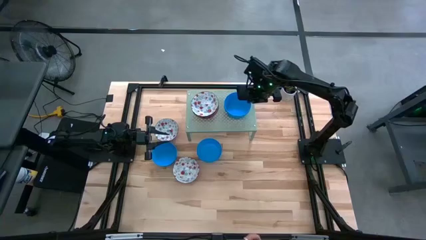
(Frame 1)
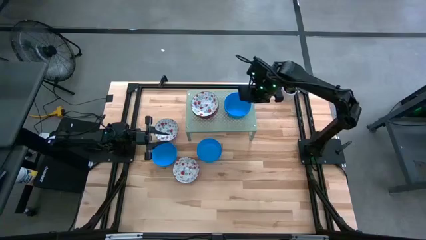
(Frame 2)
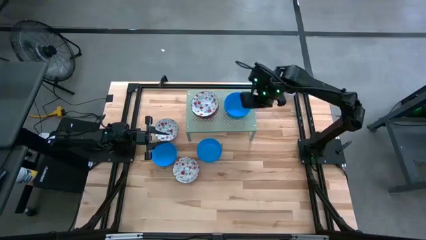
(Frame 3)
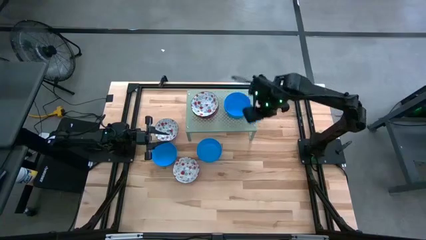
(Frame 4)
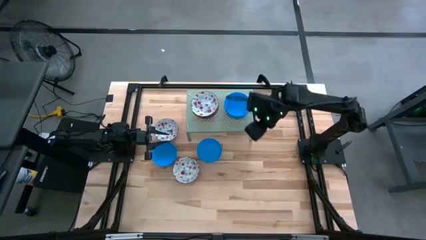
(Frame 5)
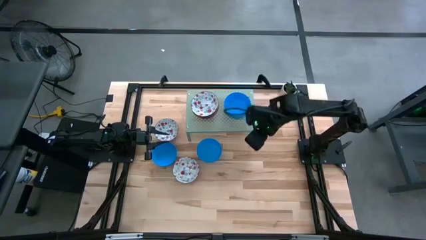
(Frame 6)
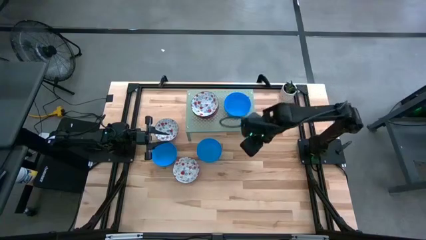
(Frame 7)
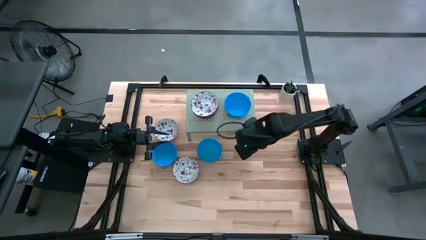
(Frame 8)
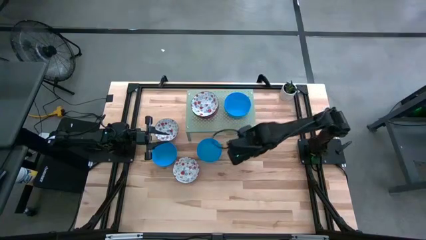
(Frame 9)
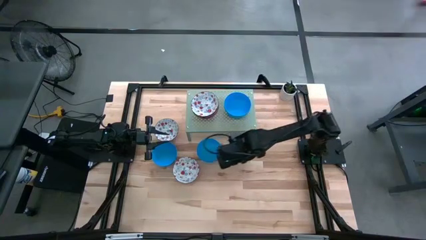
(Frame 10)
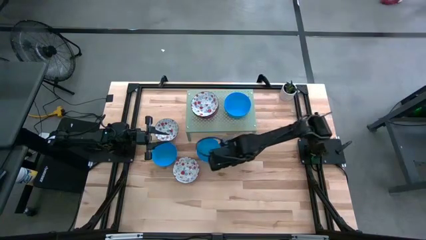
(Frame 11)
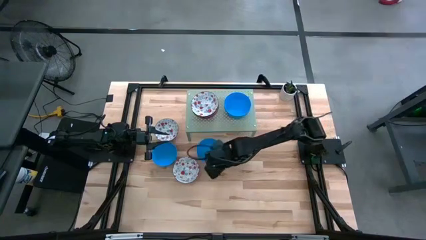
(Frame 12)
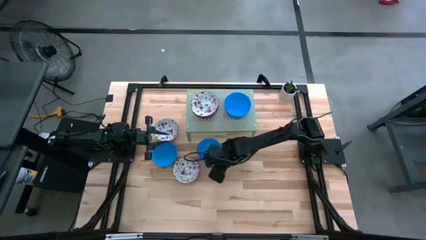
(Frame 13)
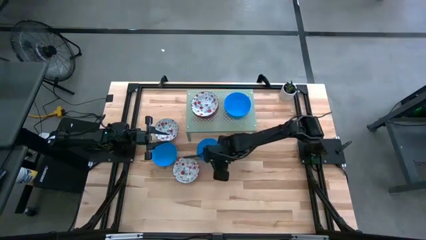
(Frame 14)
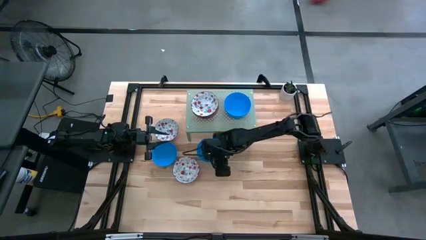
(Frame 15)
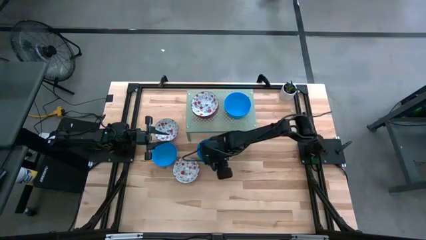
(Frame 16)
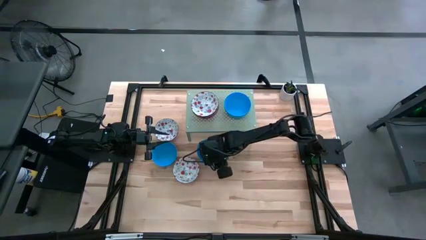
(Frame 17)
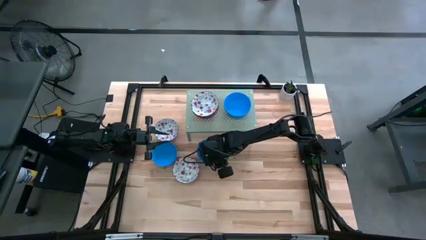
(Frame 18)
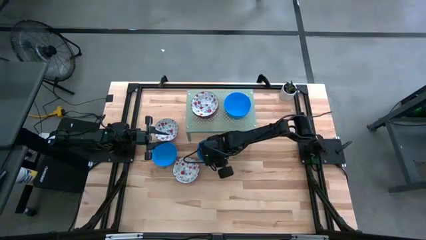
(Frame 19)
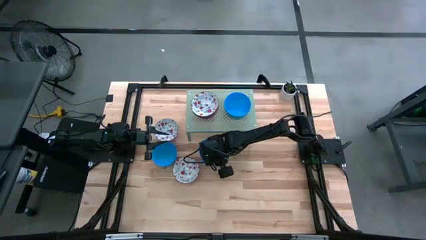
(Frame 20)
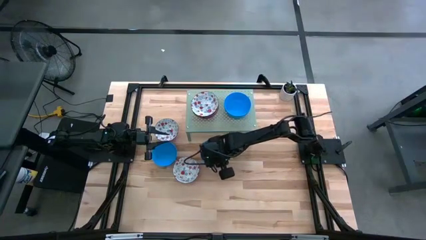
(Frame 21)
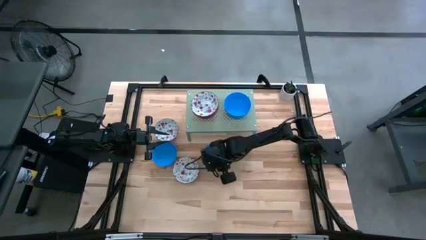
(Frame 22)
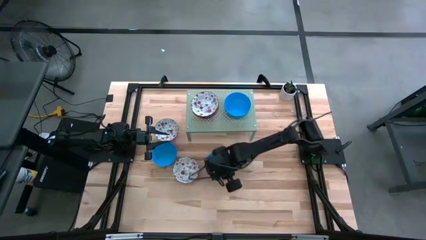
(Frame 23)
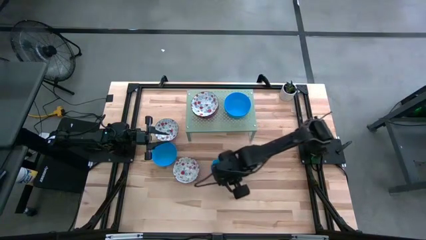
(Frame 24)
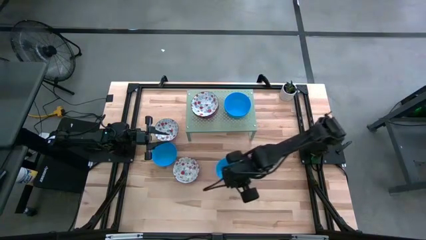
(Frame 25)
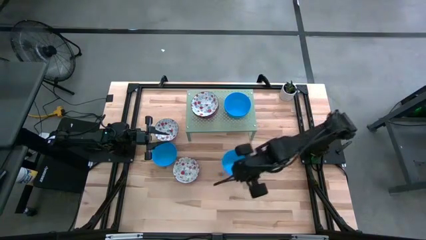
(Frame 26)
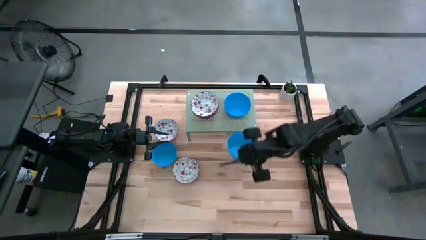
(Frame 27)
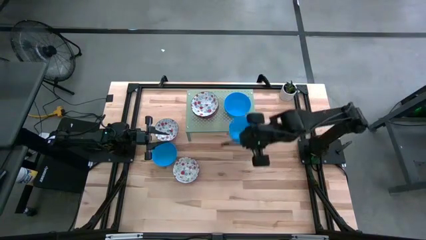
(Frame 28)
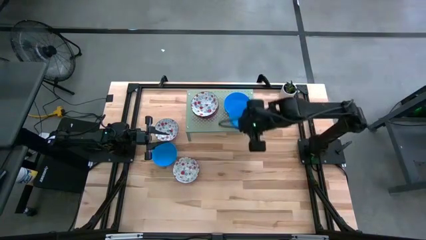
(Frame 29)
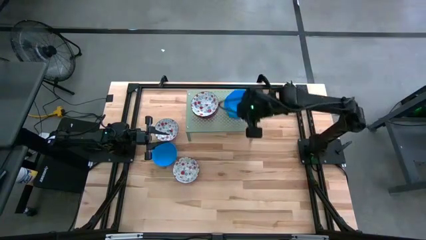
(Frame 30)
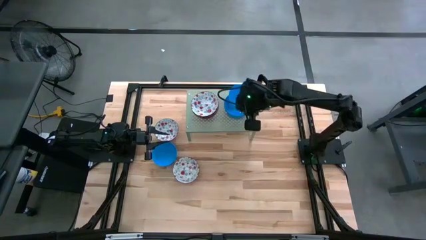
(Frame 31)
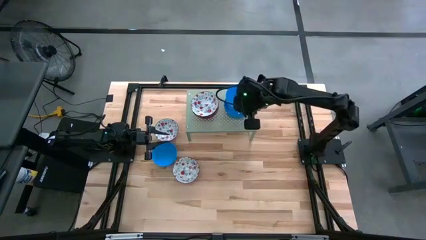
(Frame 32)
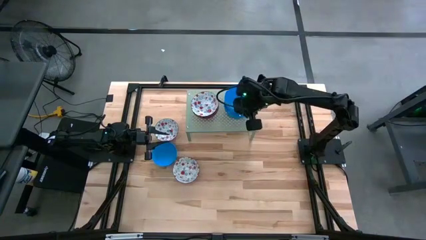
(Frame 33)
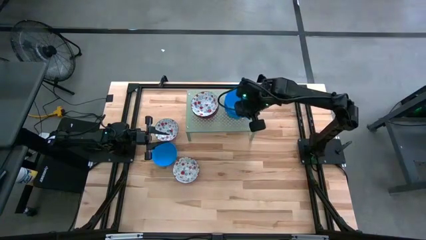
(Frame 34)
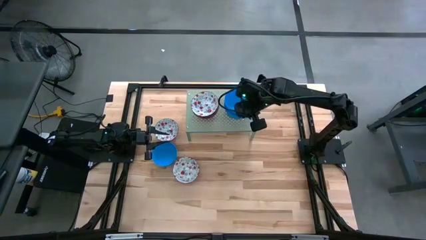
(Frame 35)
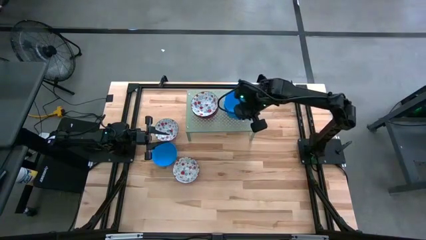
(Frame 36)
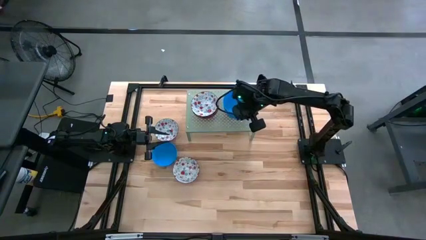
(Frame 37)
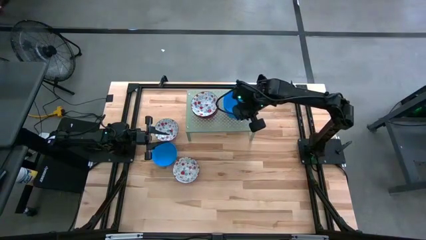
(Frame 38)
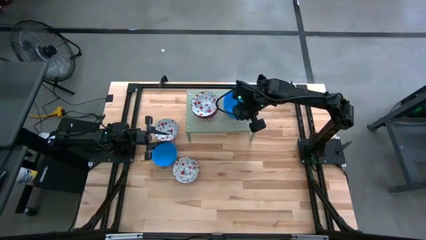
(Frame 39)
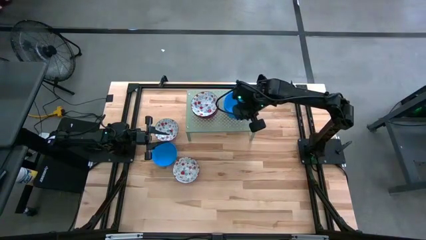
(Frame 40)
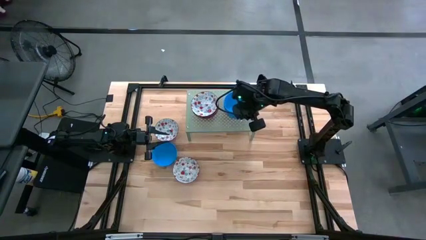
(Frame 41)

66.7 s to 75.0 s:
Task: Pick & Place Mini bowls
Stack the light blue bowl on the stacked light blue bowl on the shelf

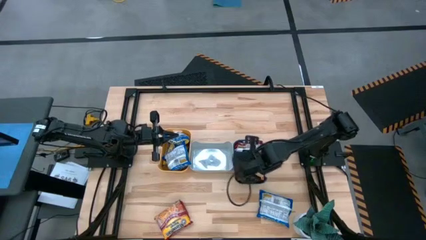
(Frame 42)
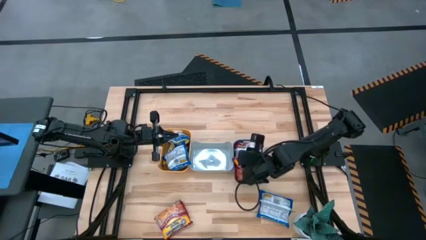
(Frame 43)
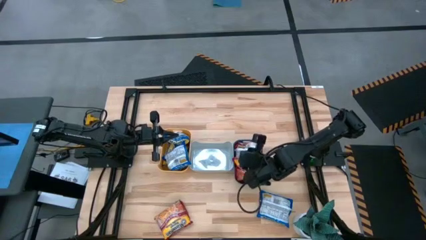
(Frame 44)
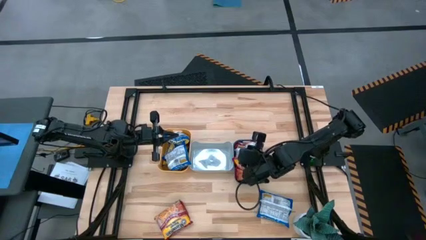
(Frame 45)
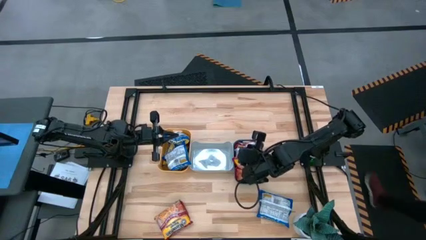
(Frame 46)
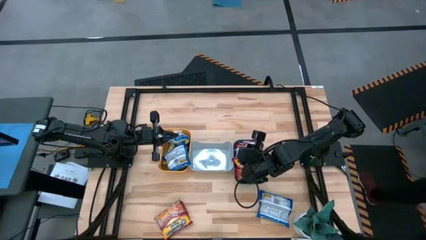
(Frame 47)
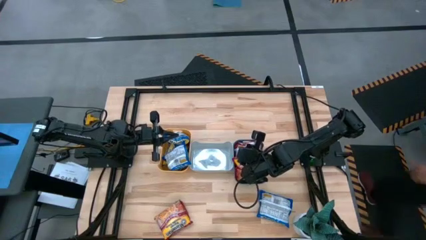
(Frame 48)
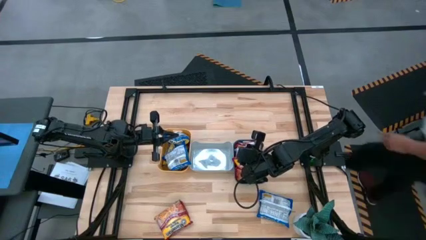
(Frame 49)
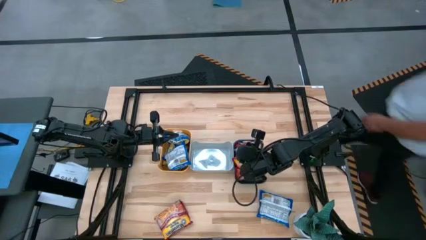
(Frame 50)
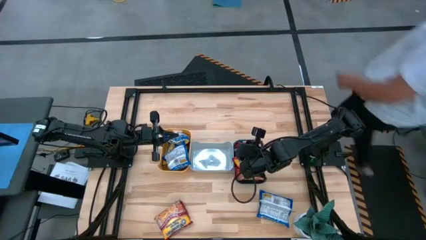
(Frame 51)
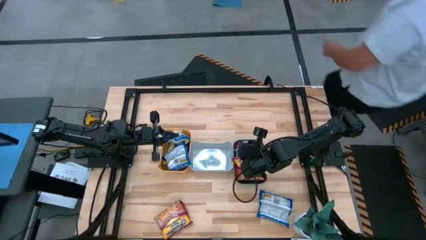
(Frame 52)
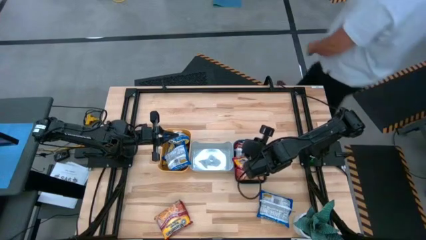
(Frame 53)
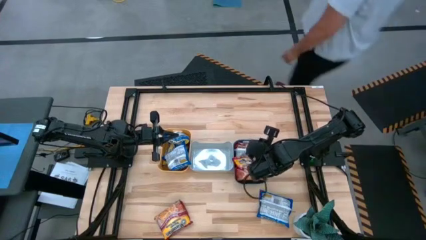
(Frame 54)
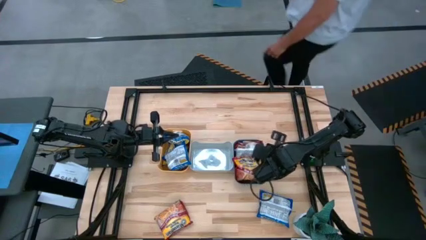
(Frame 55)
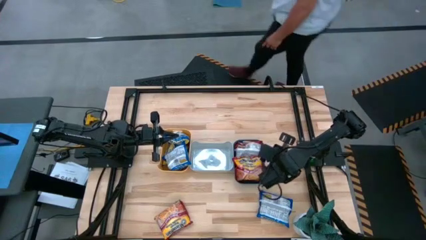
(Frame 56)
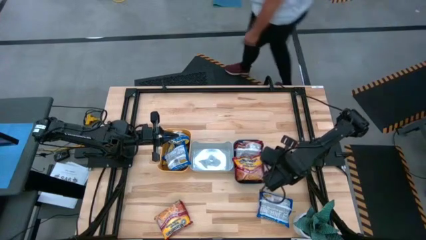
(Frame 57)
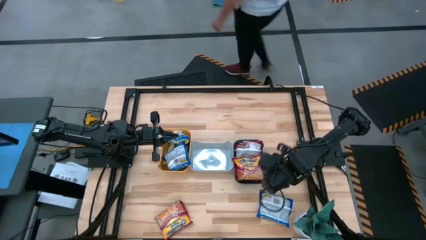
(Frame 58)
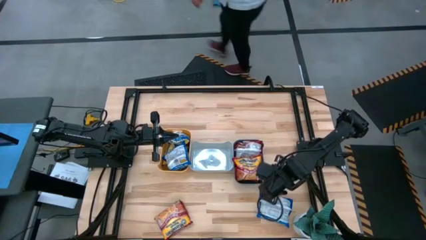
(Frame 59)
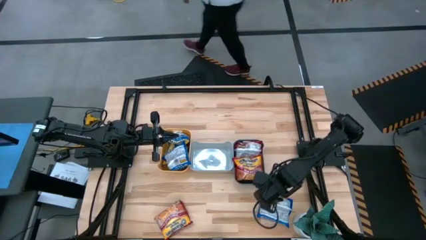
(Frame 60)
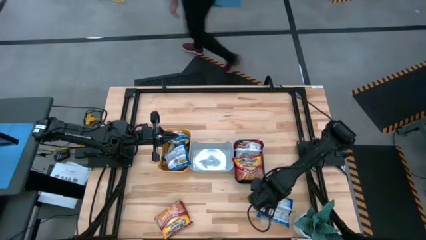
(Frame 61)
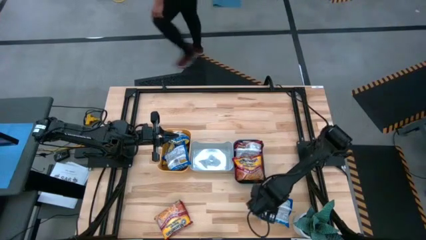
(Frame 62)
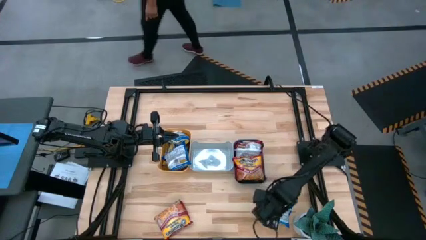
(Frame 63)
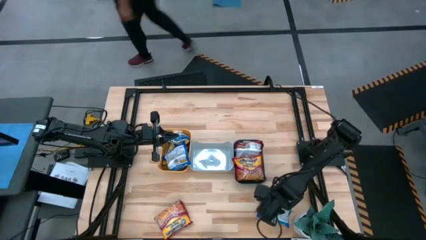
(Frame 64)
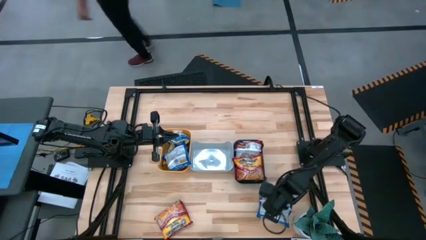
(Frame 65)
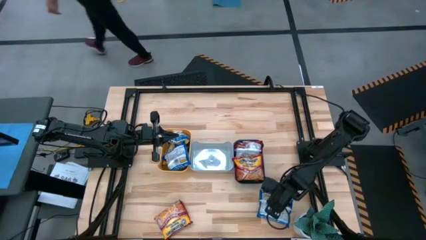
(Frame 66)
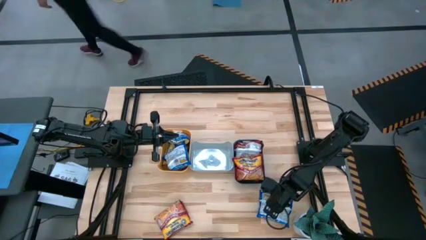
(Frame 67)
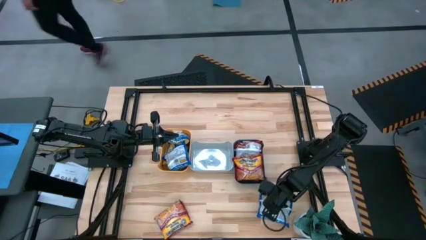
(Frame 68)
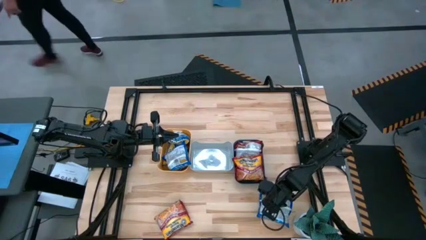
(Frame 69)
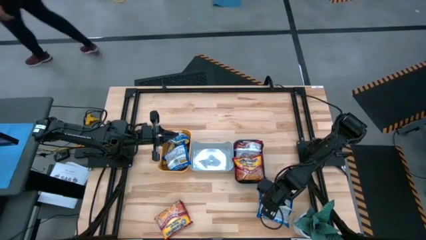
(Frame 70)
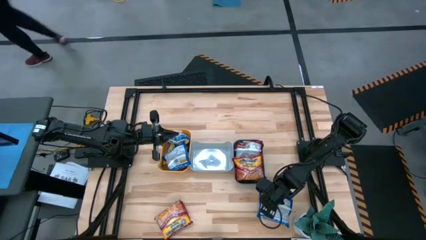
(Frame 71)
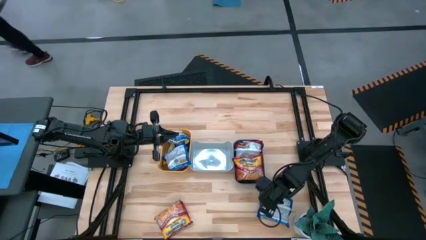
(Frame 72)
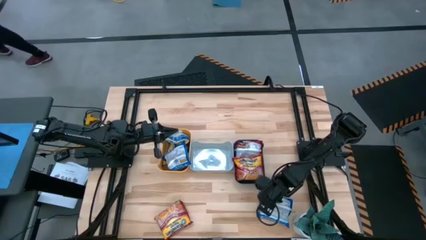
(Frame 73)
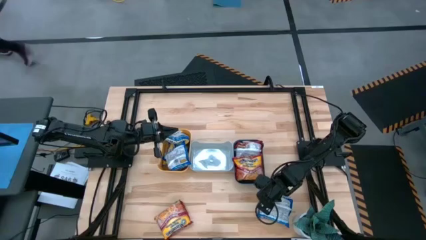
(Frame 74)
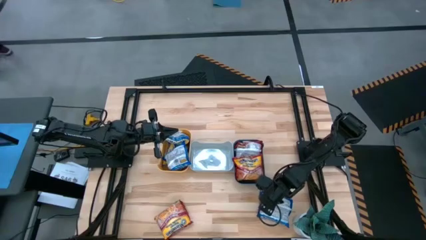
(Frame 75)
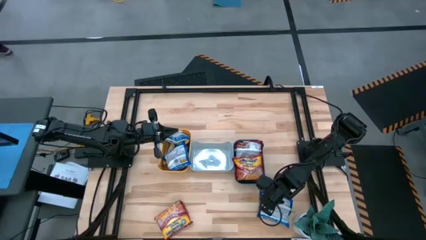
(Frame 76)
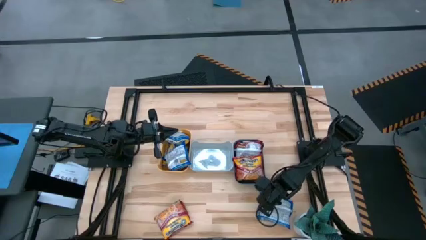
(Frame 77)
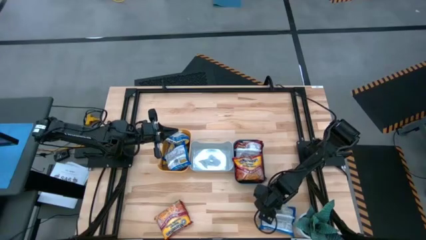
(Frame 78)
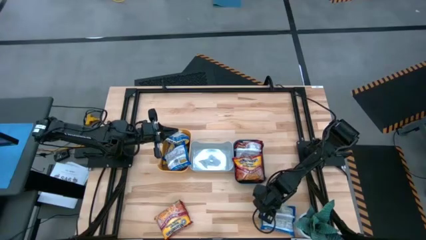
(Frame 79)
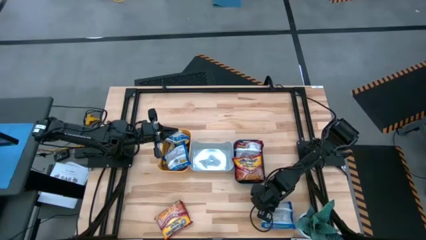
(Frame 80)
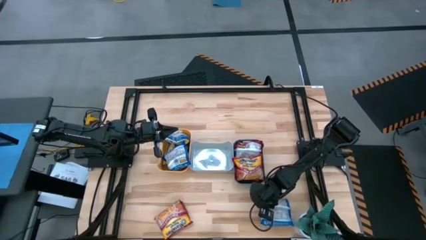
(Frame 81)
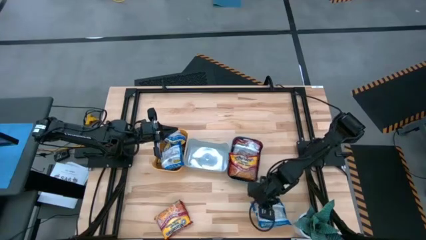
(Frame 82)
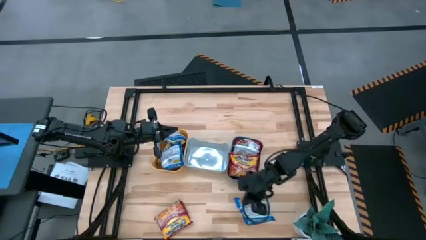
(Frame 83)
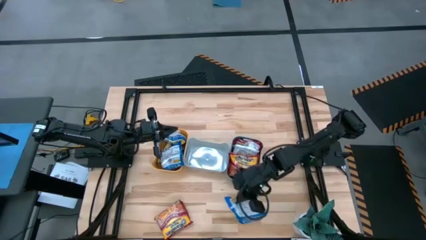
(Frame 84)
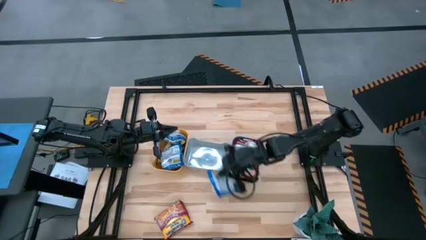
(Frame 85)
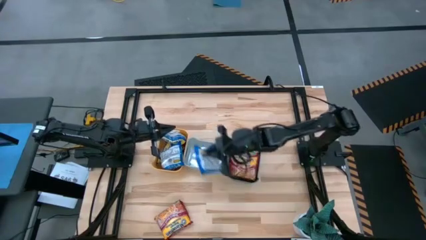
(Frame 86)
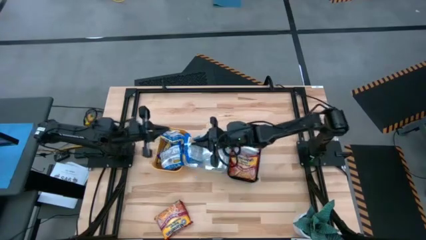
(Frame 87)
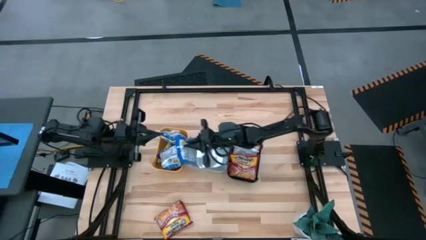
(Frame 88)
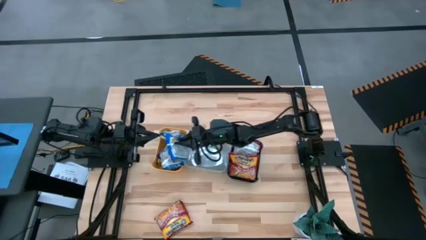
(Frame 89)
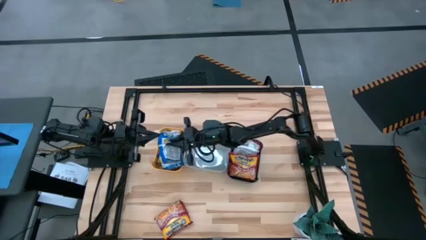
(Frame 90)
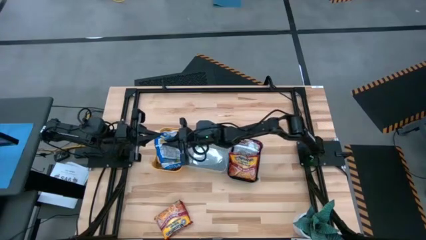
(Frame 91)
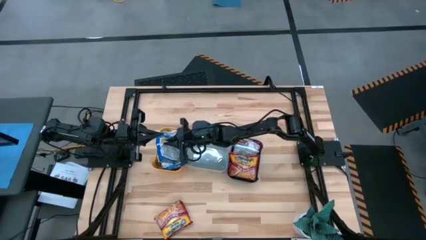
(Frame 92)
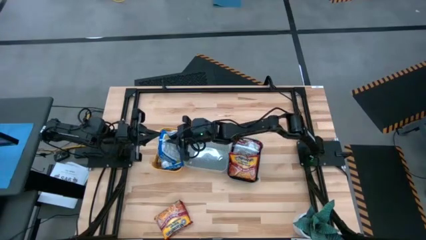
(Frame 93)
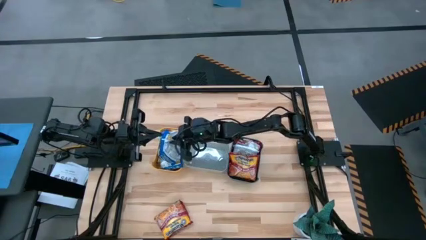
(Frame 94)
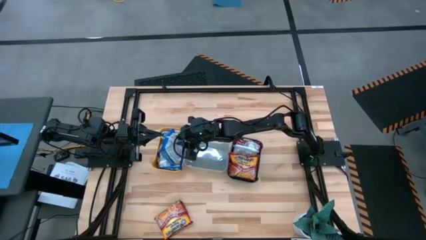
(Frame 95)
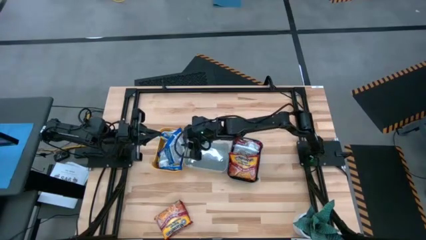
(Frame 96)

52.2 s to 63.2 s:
Task: Sort Maruchan noodles
Put the blue noodle pack into the yellow bin
